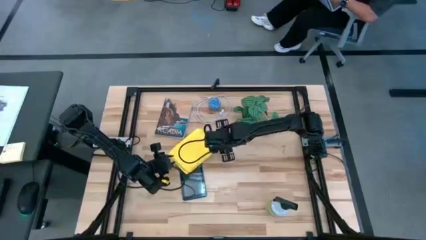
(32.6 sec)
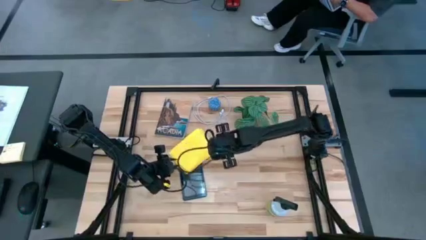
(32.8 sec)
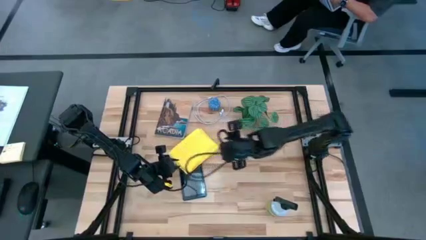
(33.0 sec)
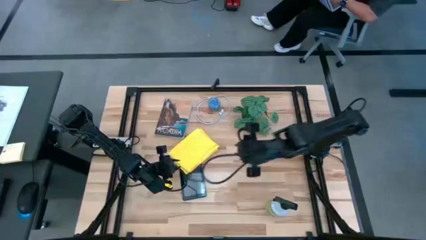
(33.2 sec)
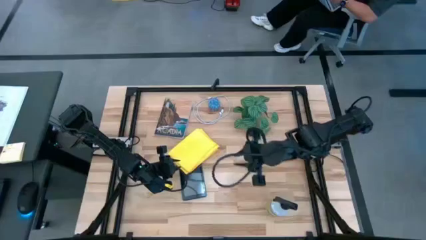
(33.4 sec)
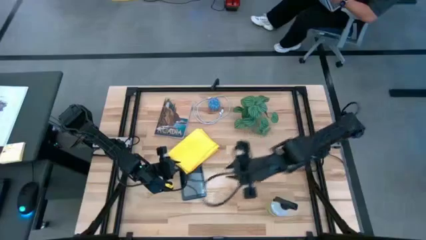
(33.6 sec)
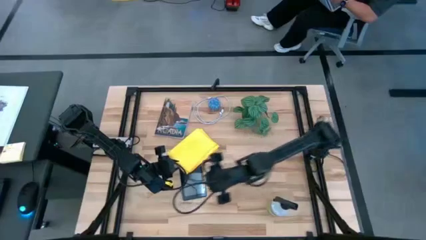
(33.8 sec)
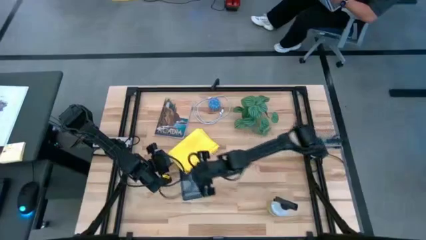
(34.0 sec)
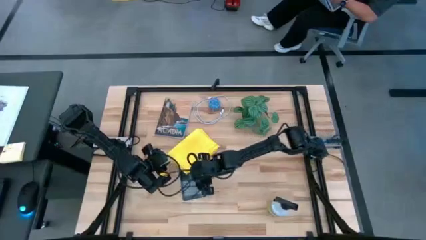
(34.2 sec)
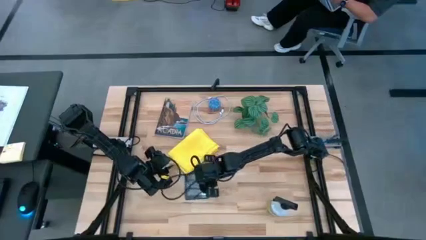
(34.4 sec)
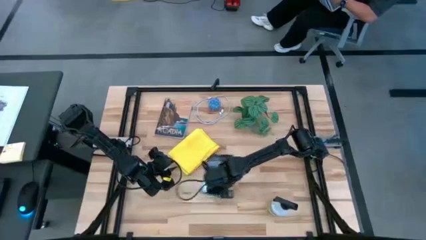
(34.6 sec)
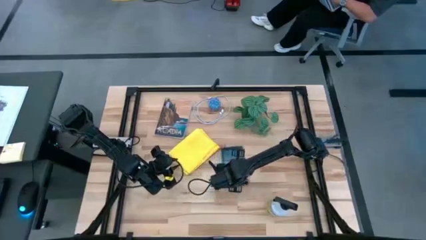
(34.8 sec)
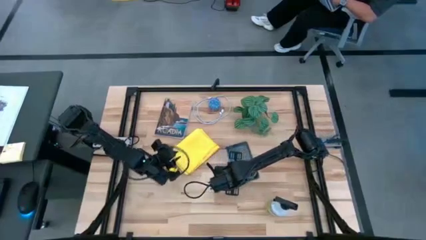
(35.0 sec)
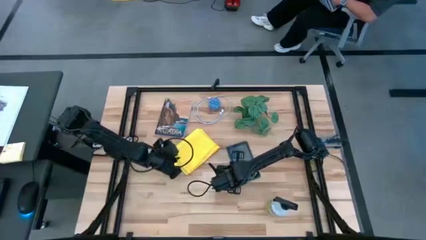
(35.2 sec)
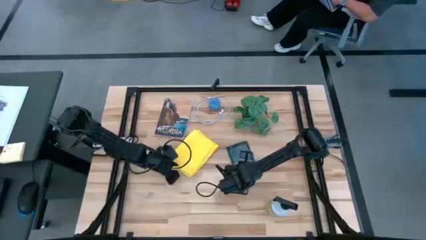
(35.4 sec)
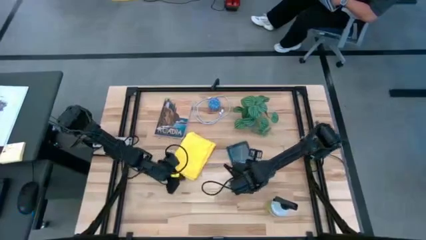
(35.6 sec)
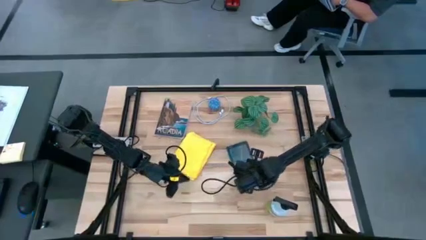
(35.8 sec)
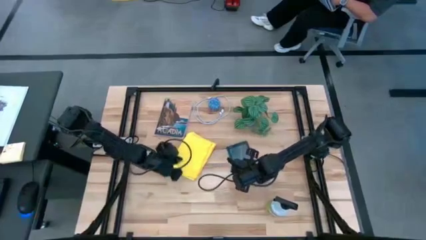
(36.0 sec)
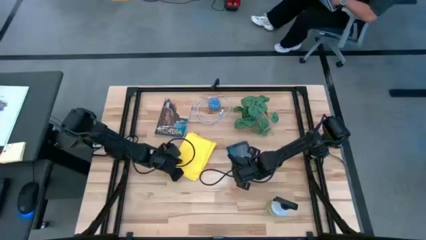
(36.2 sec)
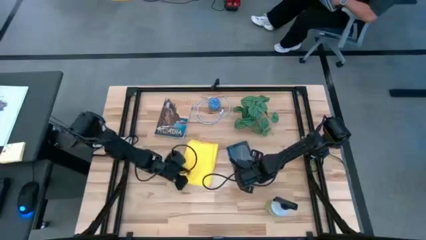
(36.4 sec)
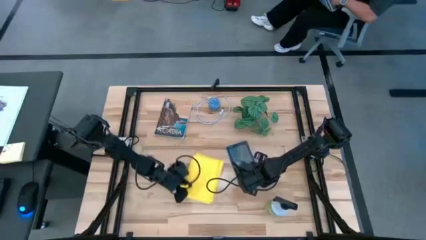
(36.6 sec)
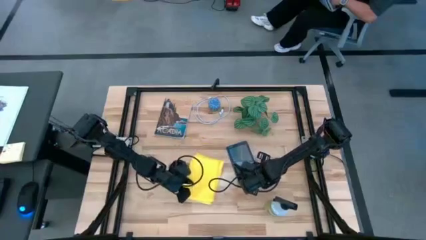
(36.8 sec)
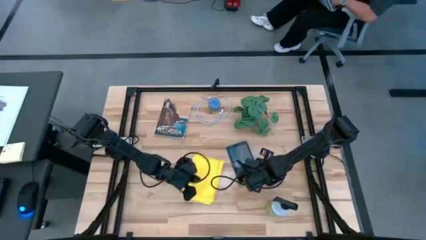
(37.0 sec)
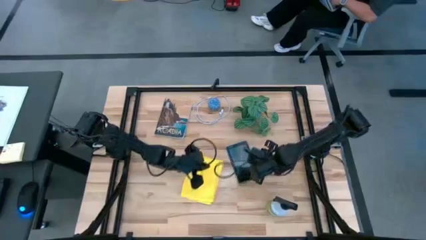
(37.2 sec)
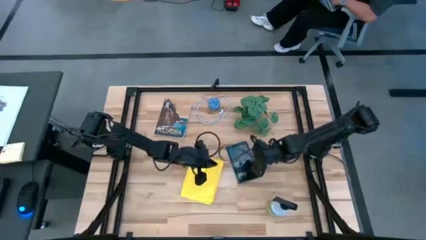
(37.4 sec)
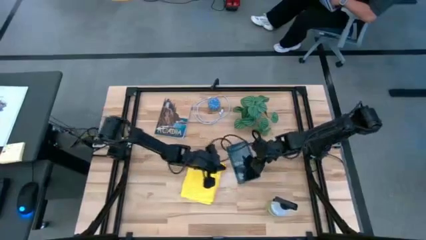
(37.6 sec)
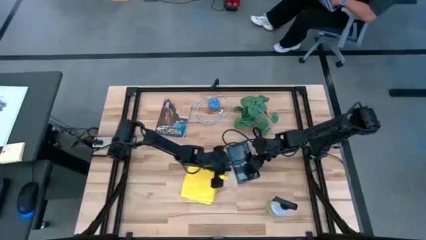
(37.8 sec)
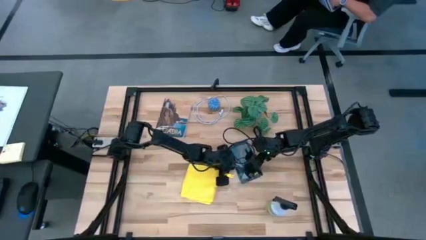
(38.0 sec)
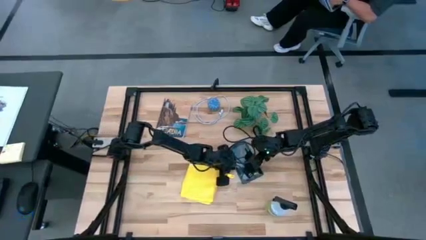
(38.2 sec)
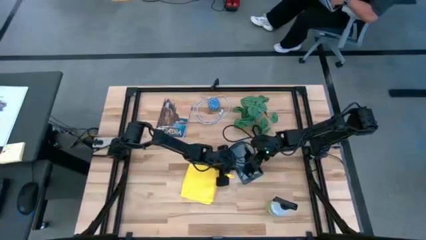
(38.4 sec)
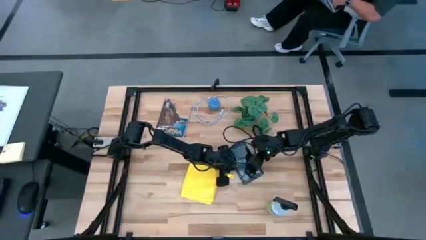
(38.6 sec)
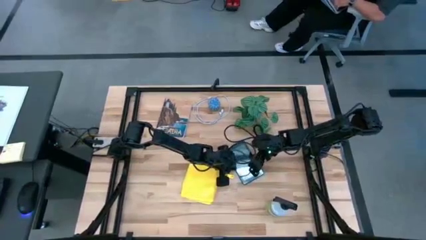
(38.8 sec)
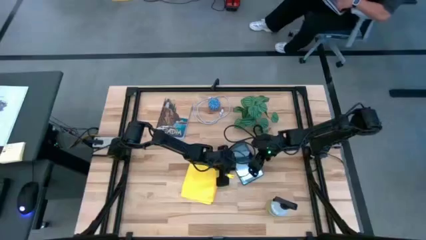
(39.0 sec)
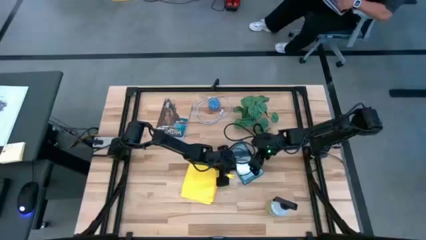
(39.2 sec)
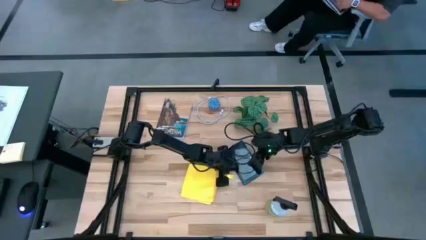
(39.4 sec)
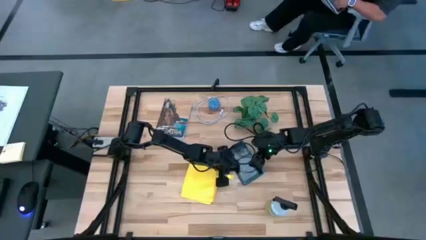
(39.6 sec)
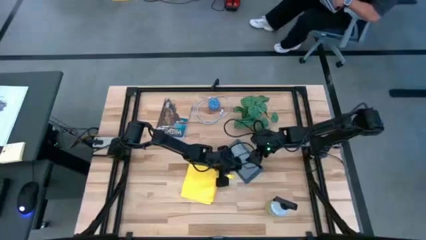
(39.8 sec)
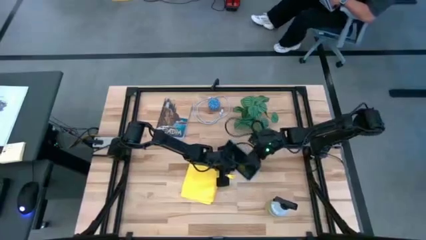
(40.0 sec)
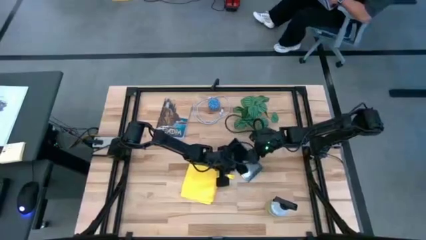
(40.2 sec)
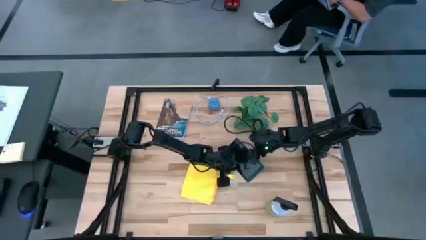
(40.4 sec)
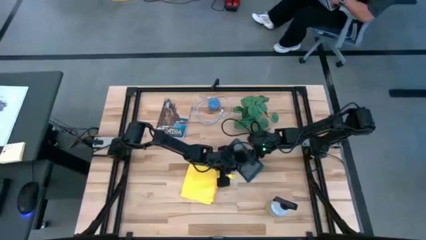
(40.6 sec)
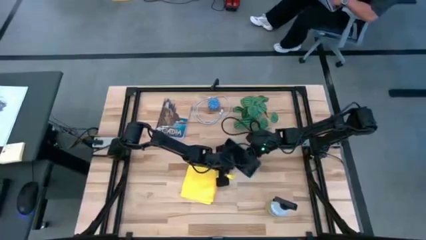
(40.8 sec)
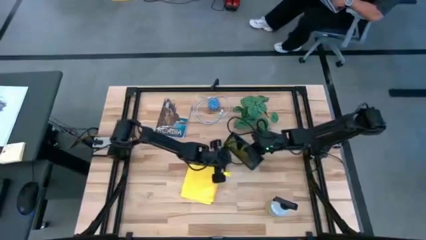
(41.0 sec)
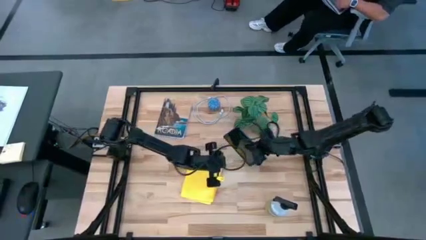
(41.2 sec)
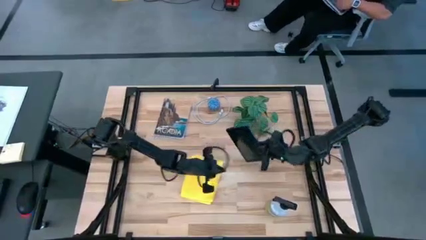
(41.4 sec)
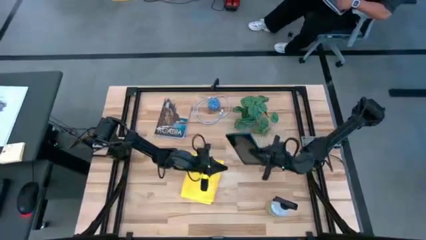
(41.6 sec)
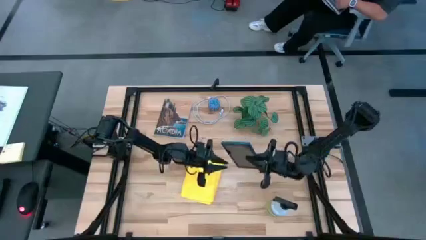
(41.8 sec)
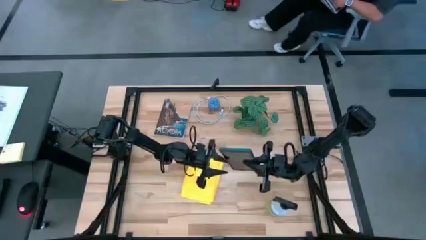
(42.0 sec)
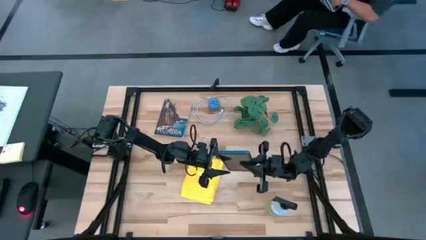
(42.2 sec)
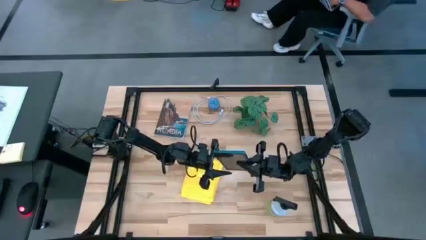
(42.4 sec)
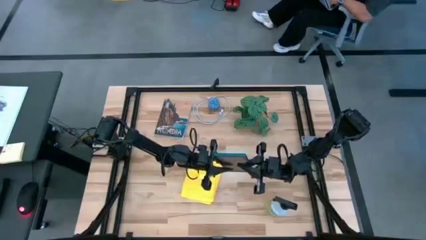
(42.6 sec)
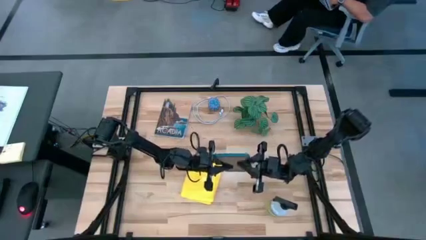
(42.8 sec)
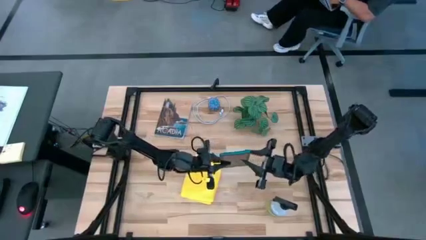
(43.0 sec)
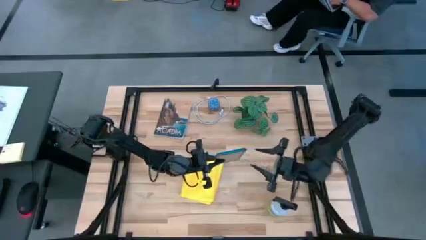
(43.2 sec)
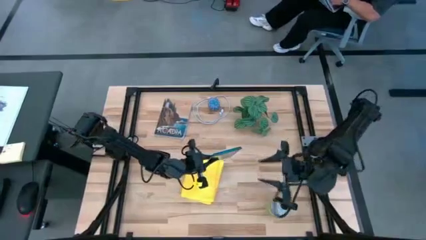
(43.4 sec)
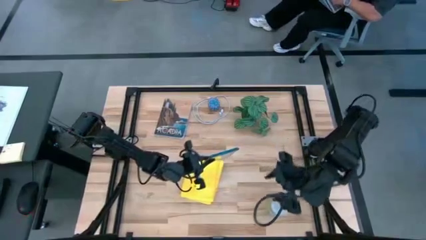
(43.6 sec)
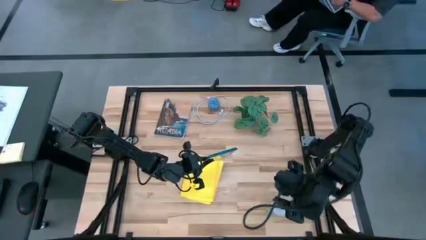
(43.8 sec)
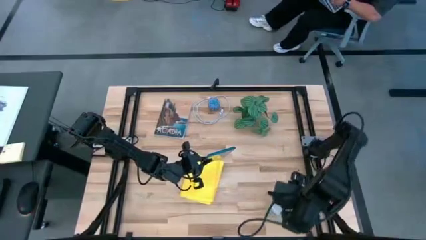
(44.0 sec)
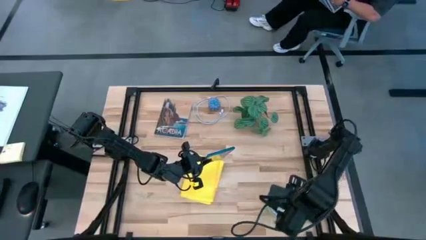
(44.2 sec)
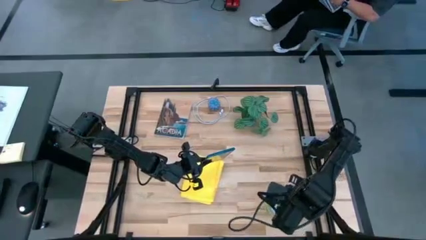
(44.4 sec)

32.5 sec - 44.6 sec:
Task: Clean tablet
Spray the front of the tablet using the cleaning bottle
